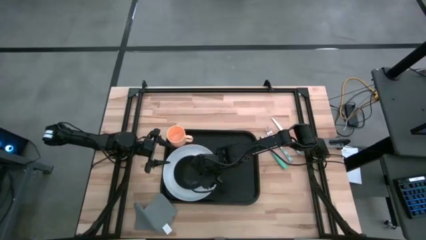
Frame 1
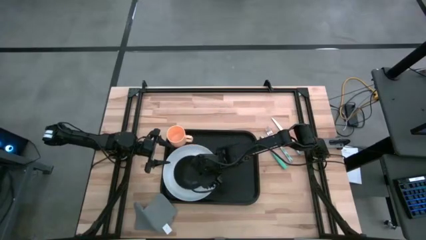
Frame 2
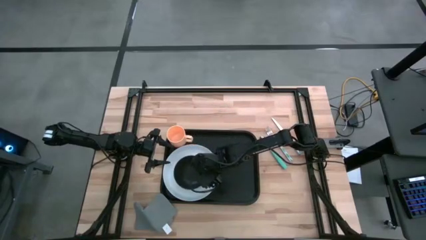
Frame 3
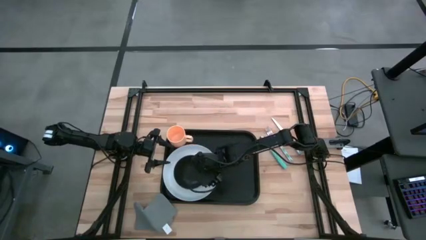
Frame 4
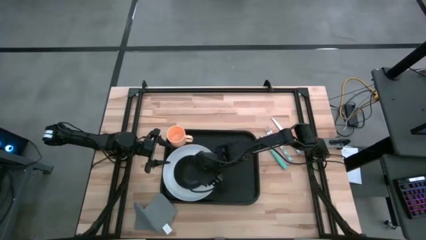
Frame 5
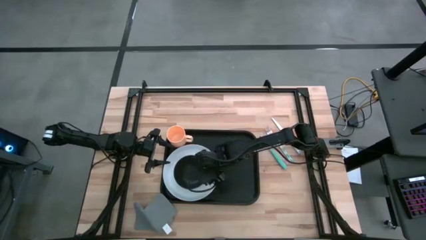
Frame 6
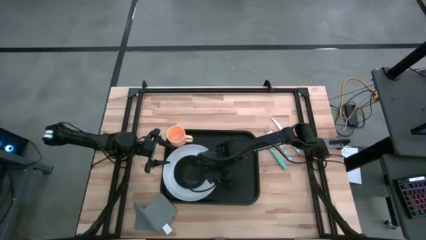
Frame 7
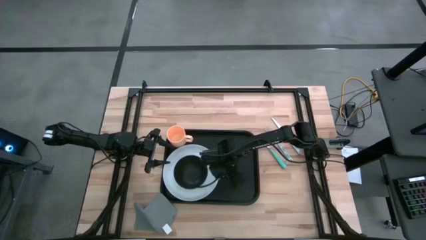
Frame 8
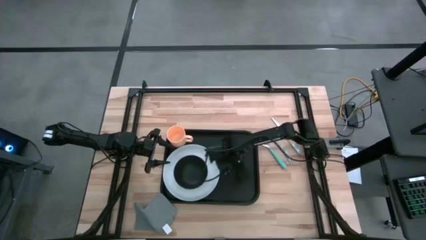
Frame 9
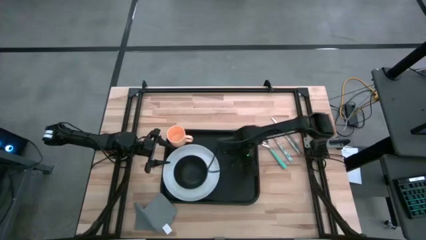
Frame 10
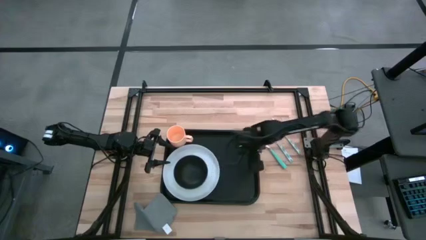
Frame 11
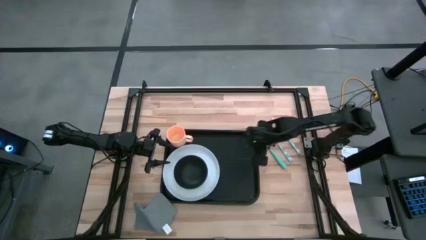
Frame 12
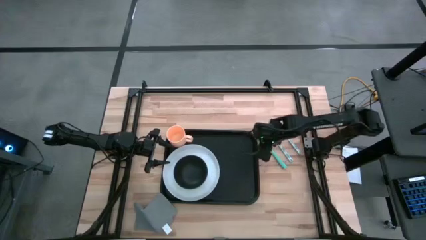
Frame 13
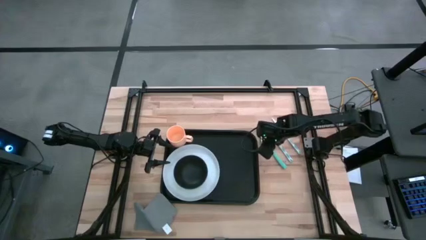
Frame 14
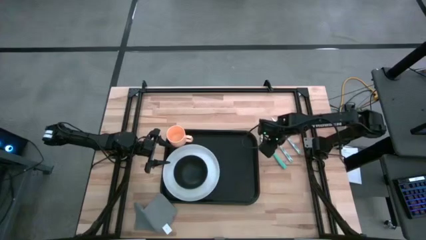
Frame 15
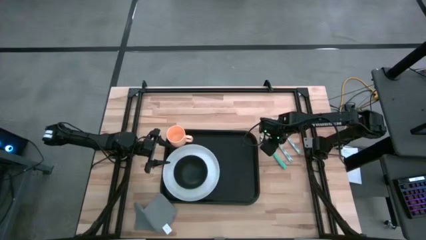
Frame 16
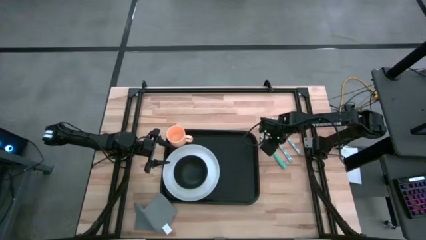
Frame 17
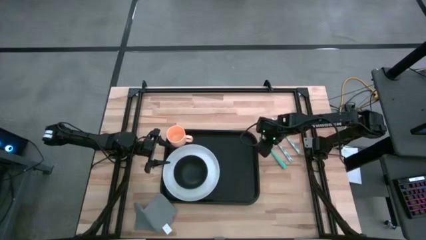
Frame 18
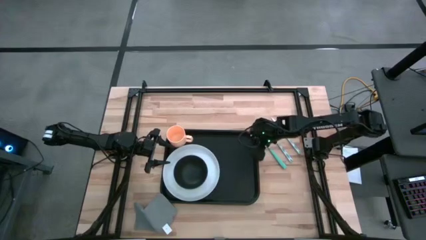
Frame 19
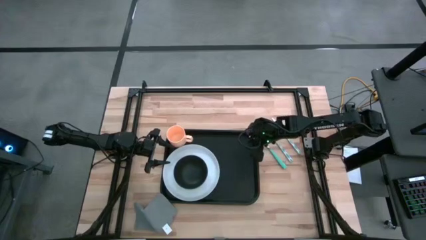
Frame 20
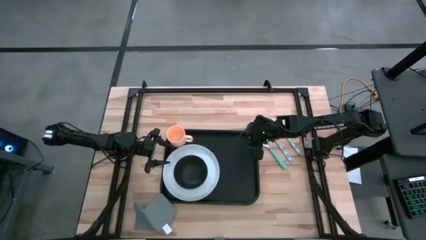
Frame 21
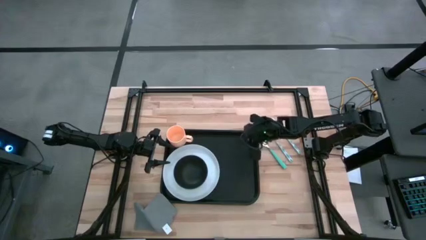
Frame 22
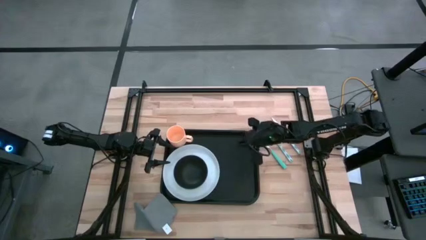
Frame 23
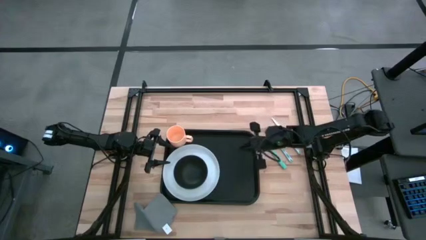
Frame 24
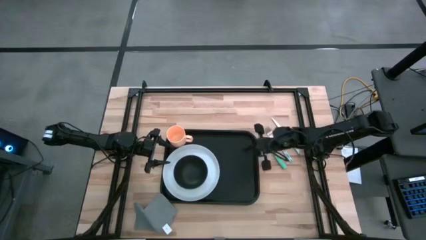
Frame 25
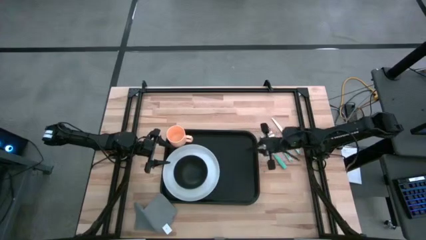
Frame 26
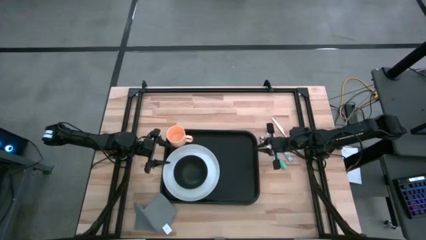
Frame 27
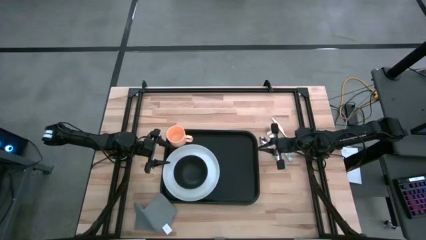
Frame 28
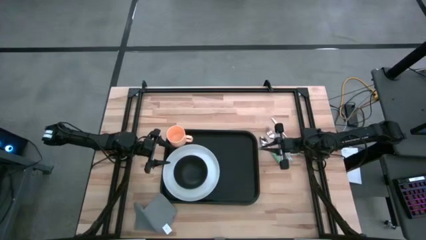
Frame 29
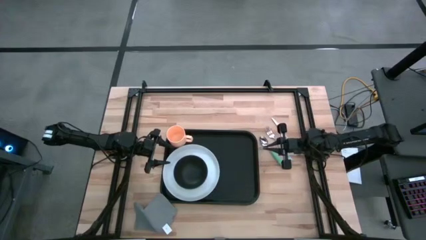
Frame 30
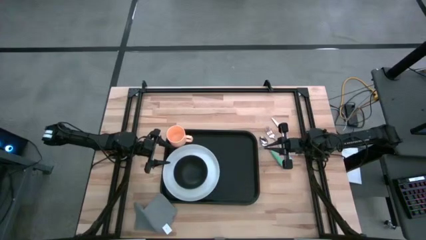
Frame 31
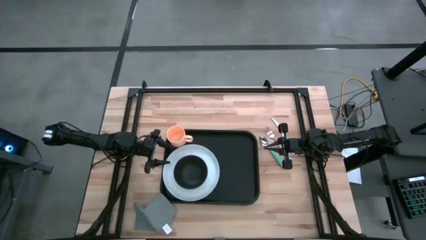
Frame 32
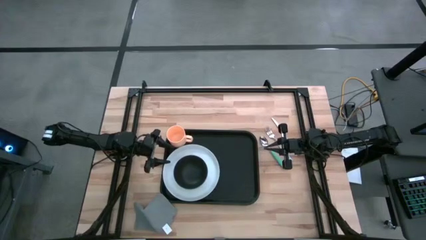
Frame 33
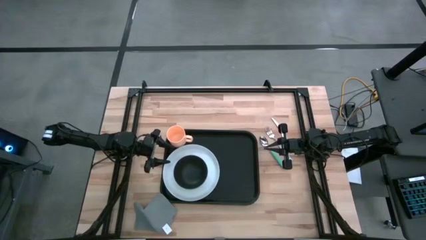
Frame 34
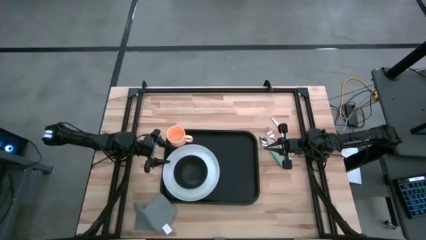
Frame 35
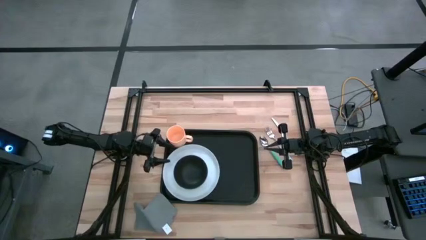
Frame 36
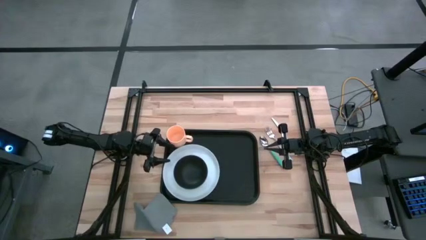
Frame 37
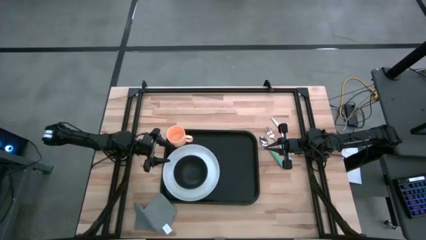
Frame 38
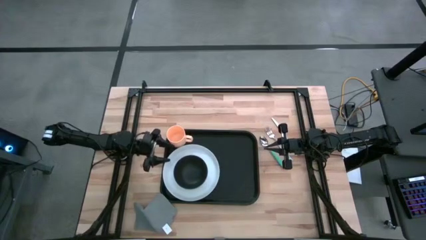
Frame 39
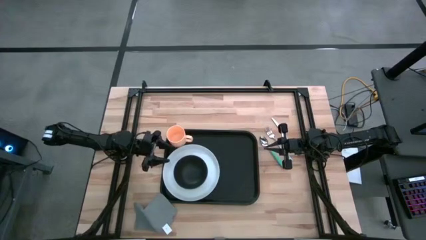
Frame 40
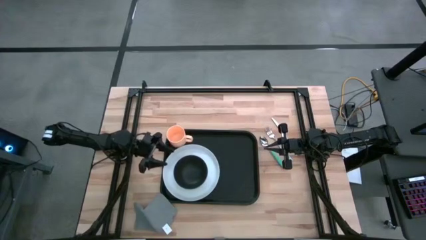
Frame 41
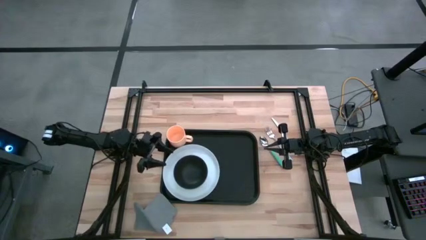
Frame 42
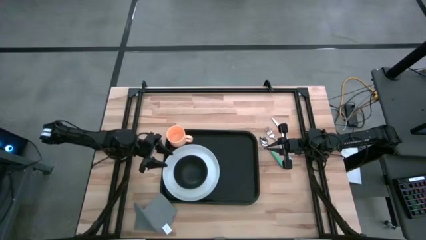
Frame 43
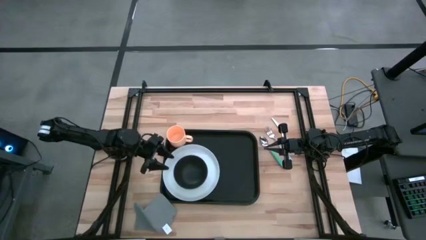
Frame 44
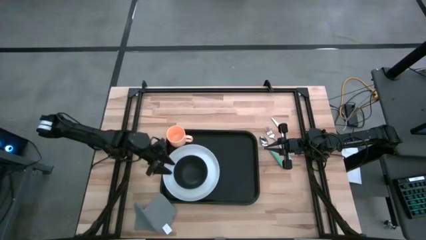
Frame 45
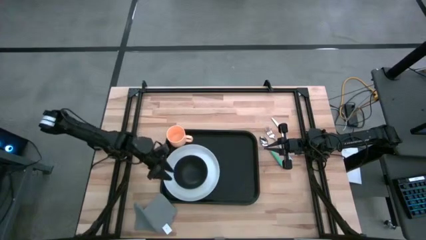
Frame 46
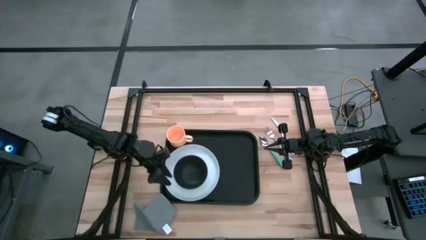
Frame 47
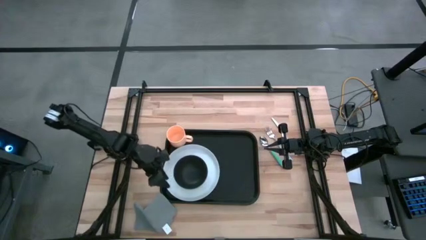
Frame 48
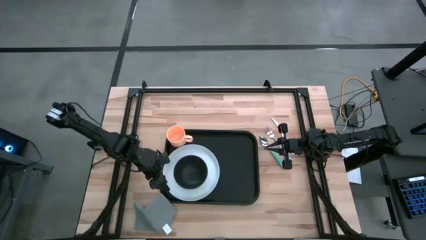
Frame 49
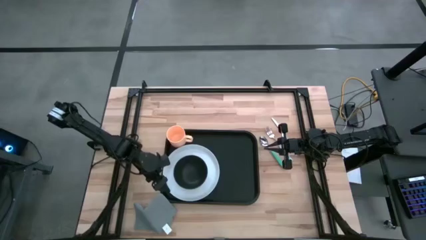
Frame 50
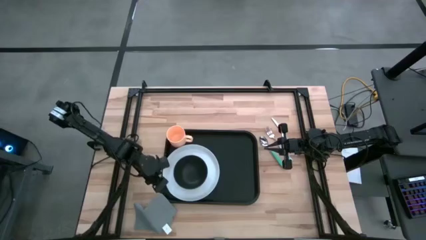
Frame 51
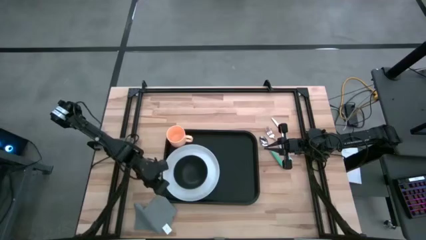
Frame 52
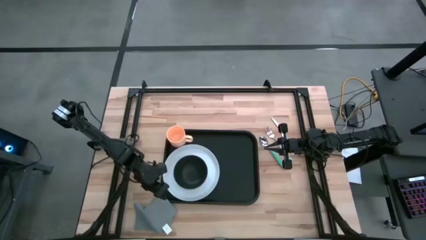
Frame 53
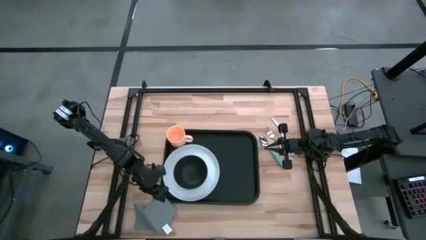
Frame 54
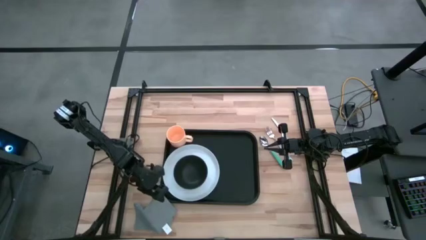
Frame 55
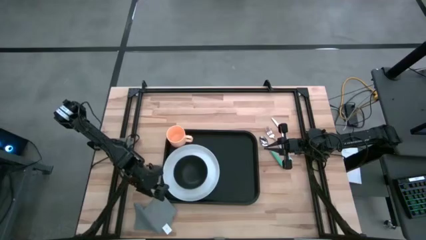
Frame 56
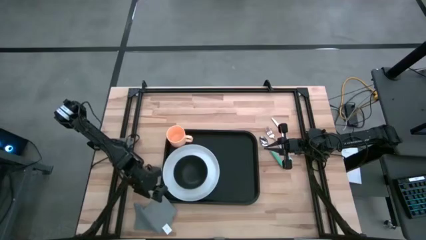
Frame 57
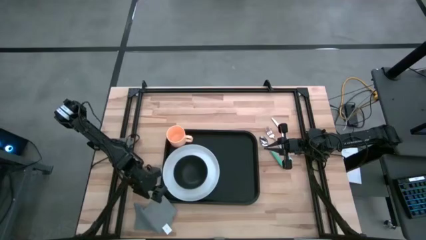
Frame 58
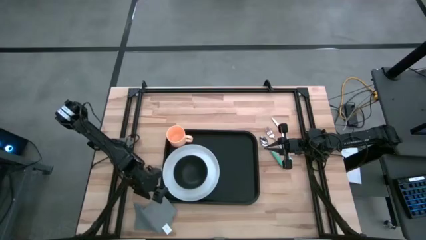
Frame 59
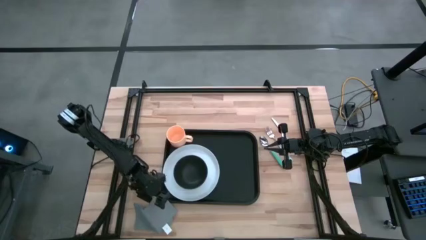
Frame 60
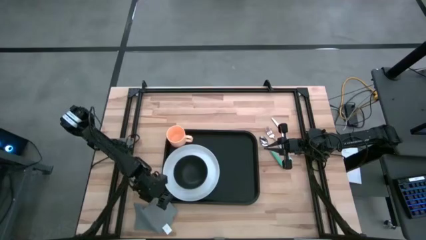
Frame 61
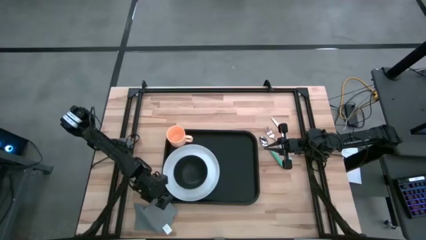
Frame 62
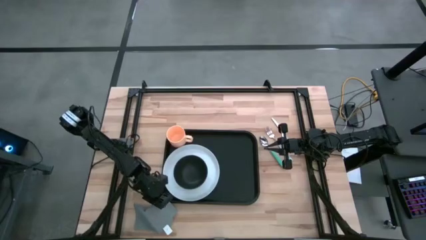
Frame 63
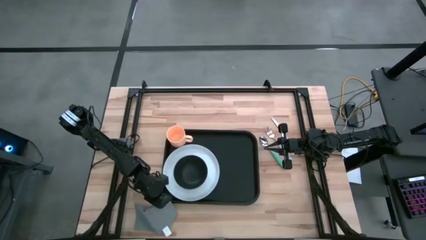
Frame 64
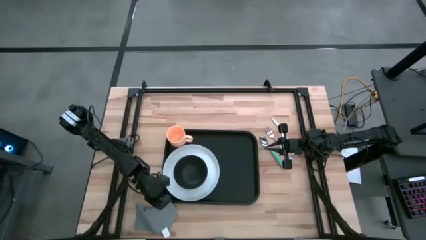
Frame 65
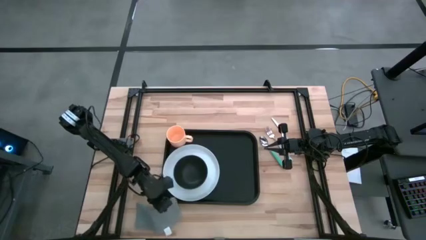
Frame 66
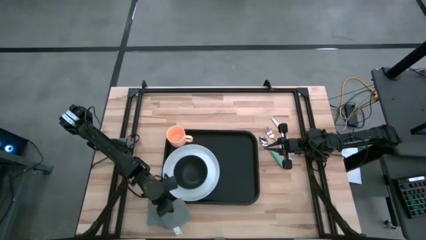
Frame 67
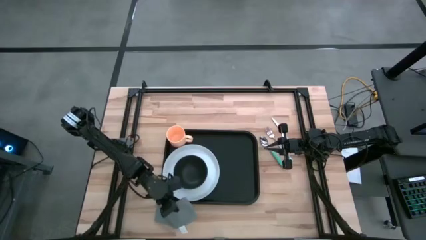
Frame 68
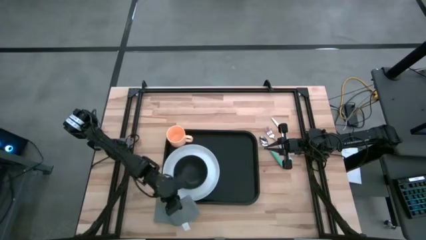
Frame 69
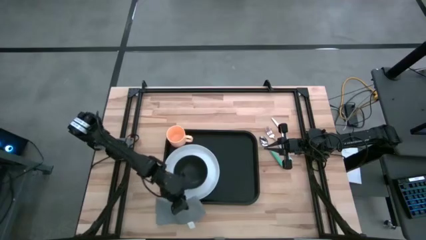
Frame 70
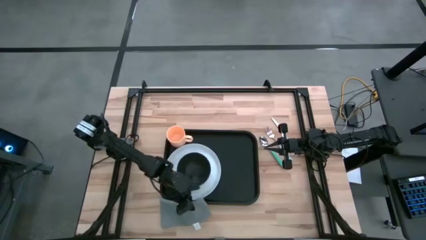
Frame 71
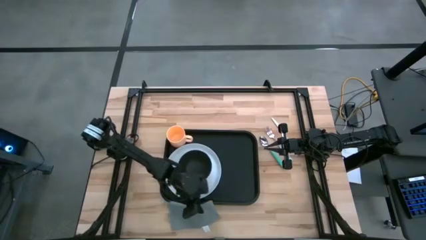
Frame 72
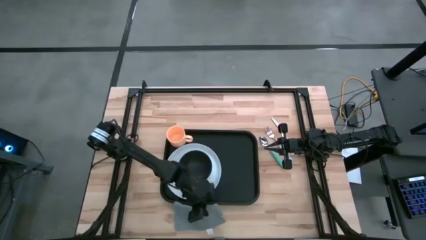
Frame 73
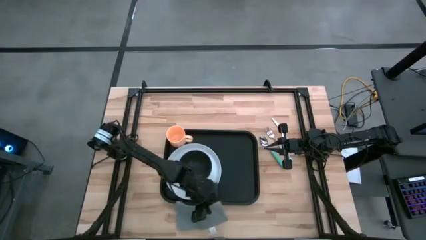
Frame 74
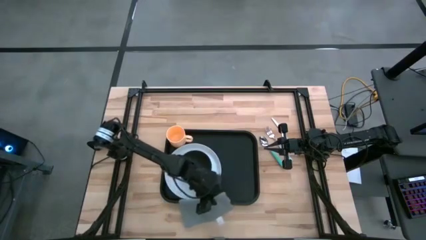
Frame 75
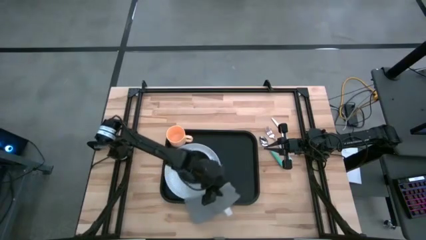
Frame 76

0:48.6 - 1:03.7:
Task: Set up tray
Put the grey napkin on the black serving tray
